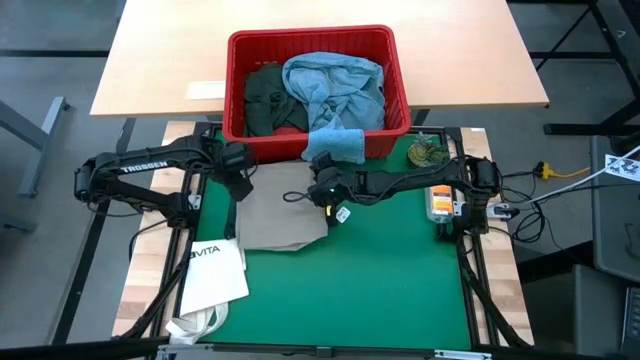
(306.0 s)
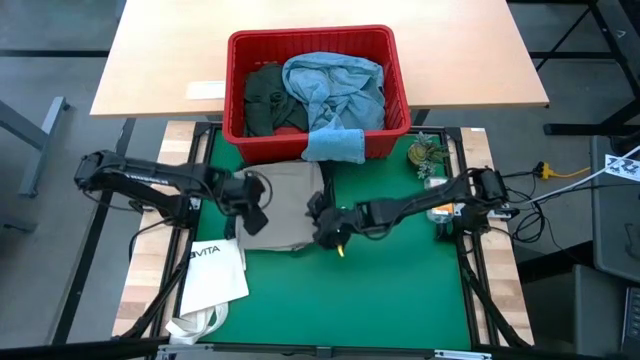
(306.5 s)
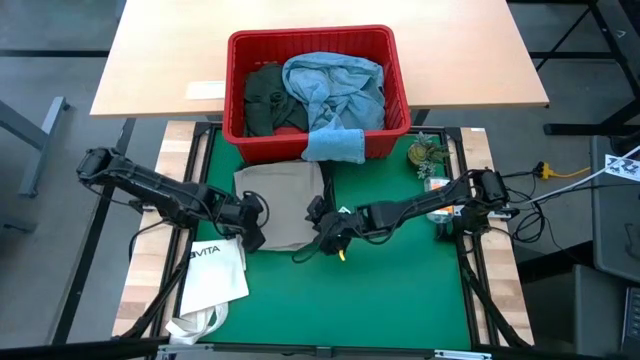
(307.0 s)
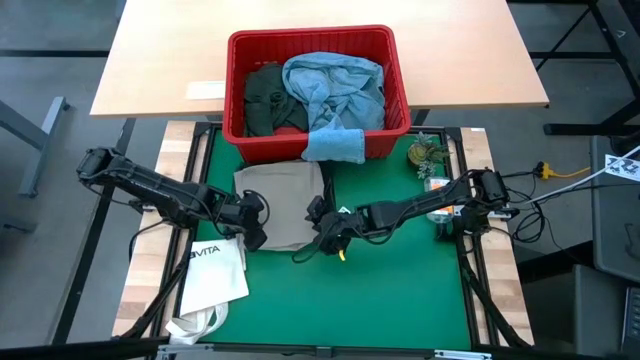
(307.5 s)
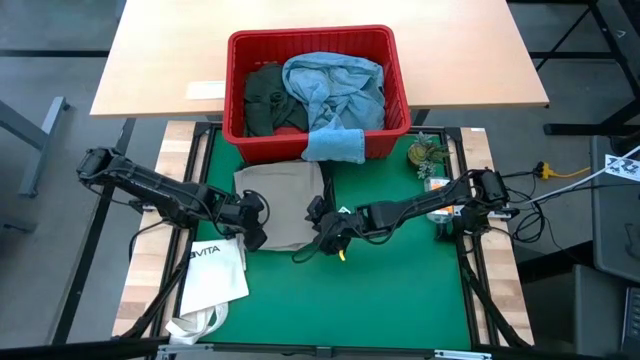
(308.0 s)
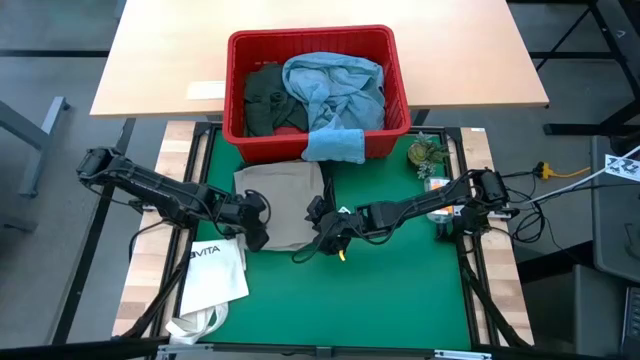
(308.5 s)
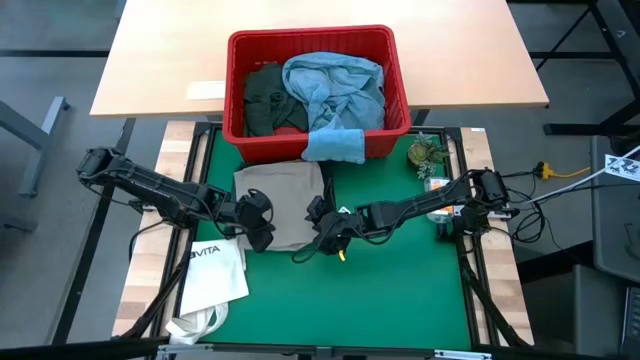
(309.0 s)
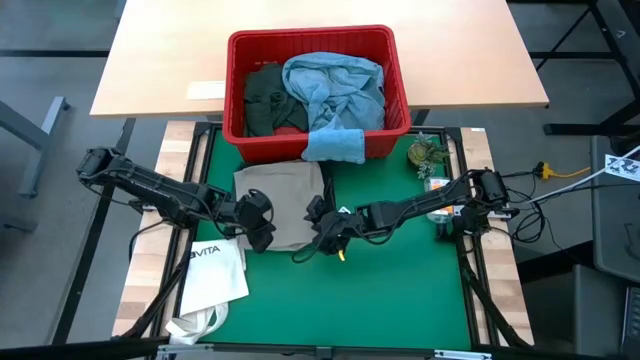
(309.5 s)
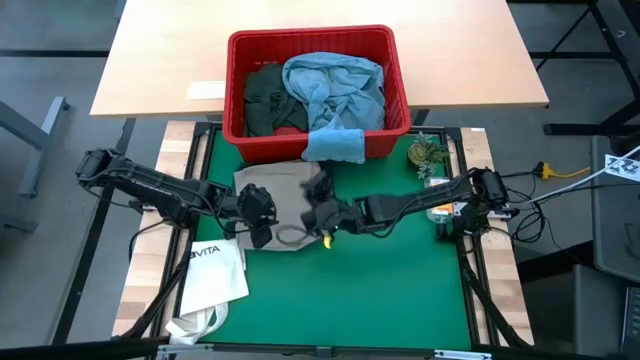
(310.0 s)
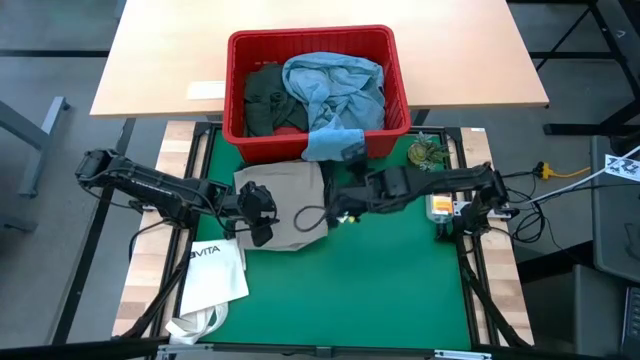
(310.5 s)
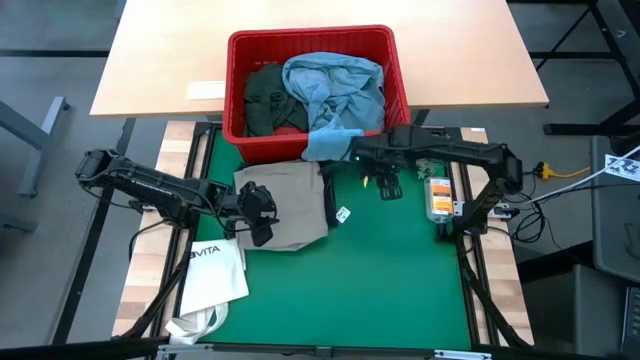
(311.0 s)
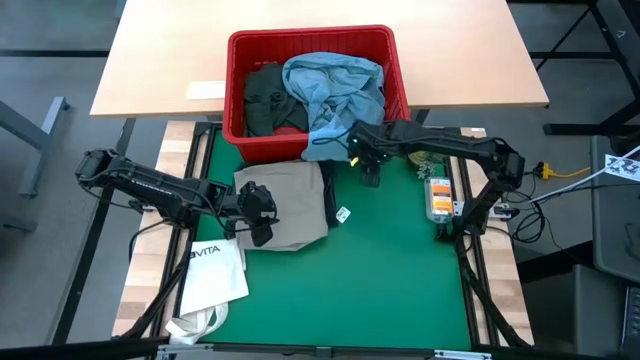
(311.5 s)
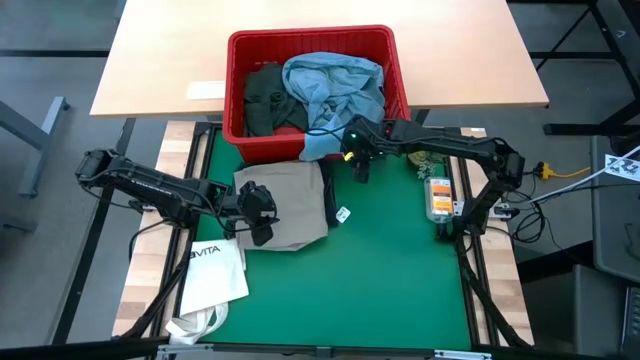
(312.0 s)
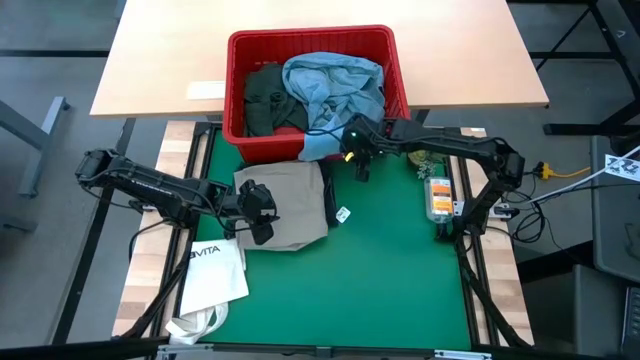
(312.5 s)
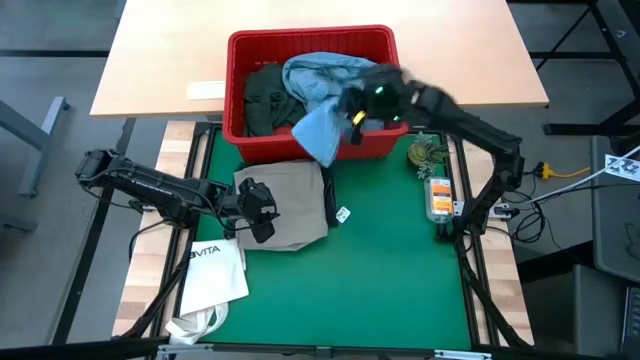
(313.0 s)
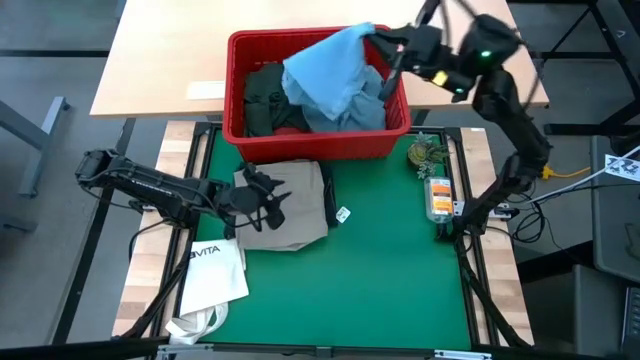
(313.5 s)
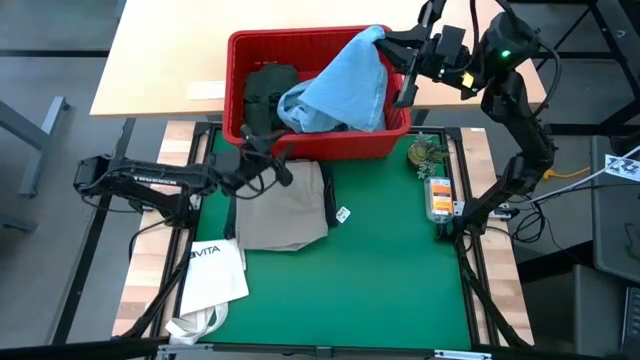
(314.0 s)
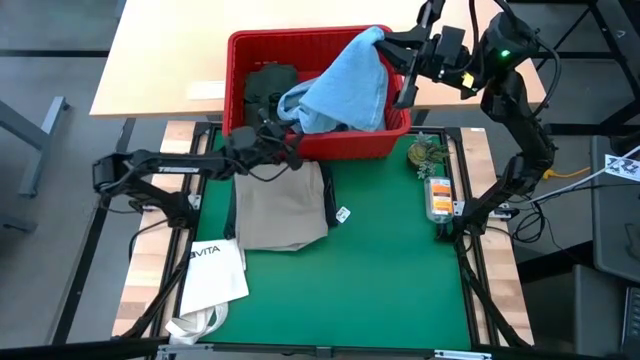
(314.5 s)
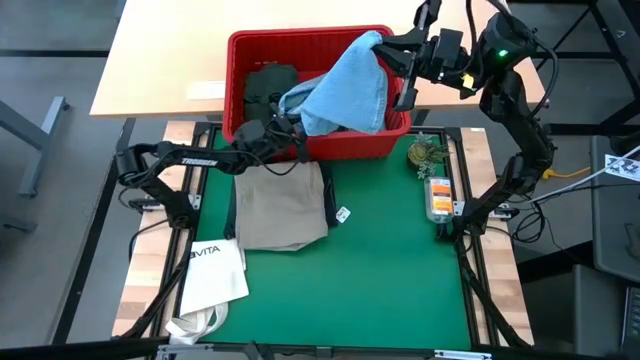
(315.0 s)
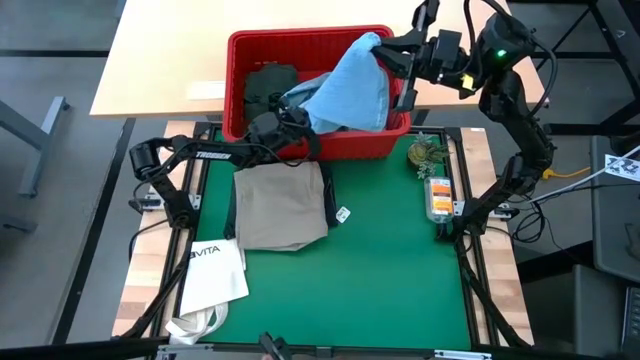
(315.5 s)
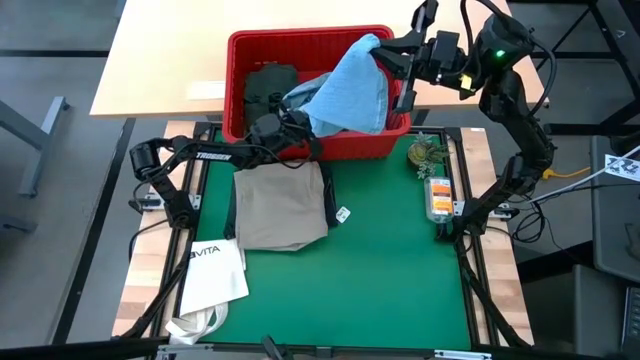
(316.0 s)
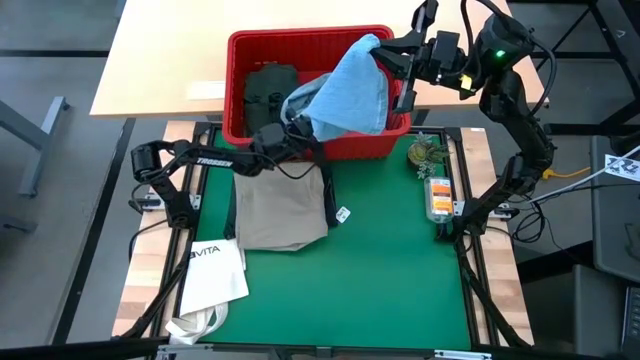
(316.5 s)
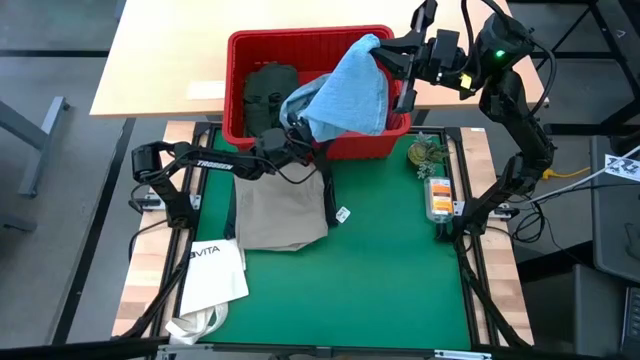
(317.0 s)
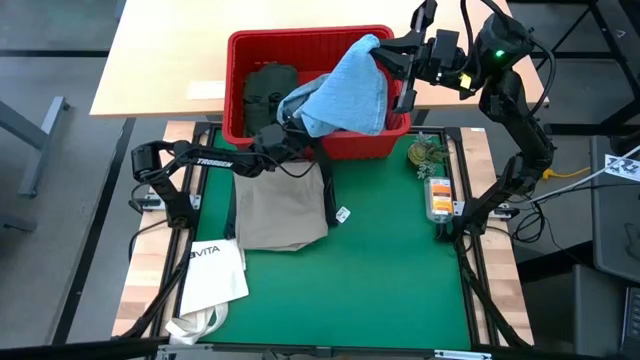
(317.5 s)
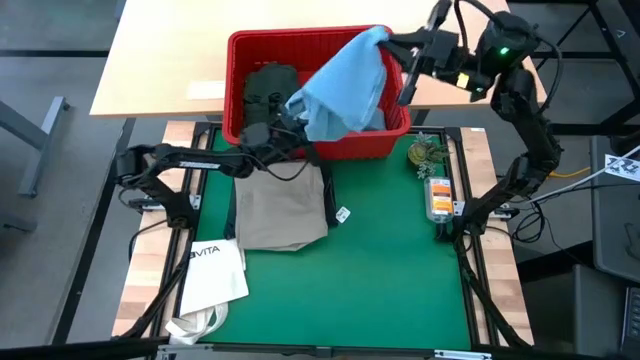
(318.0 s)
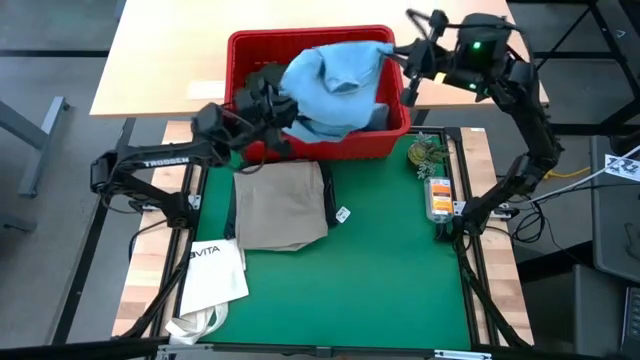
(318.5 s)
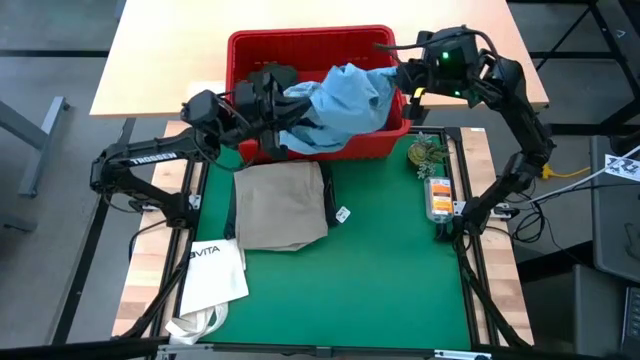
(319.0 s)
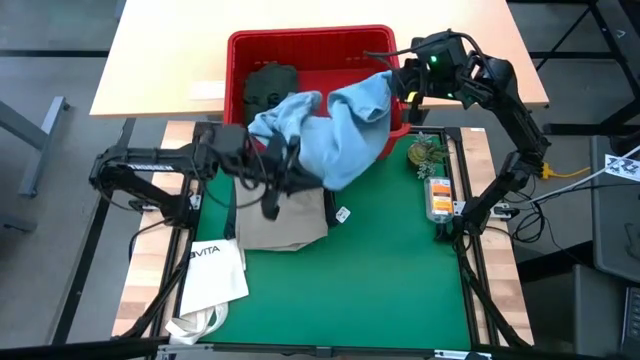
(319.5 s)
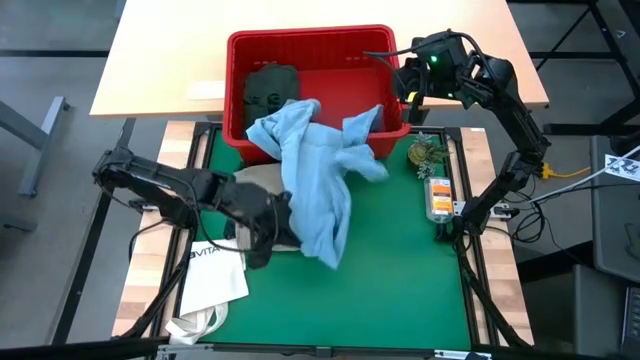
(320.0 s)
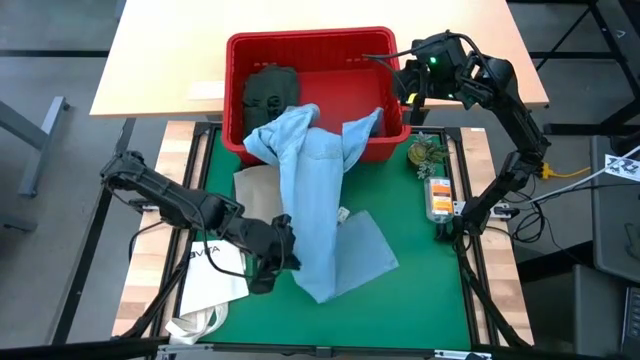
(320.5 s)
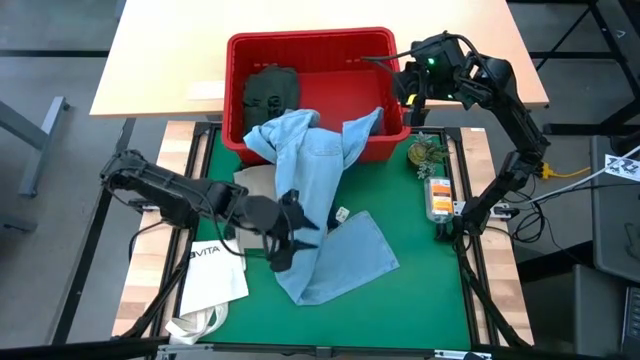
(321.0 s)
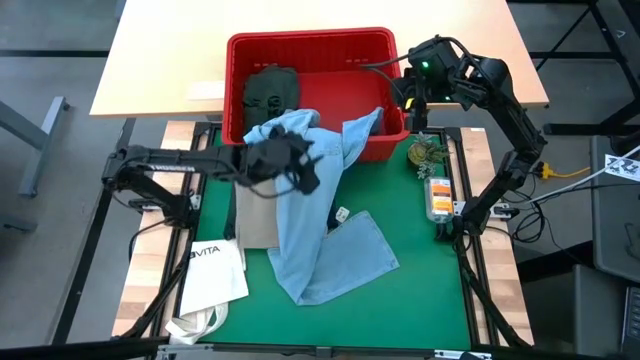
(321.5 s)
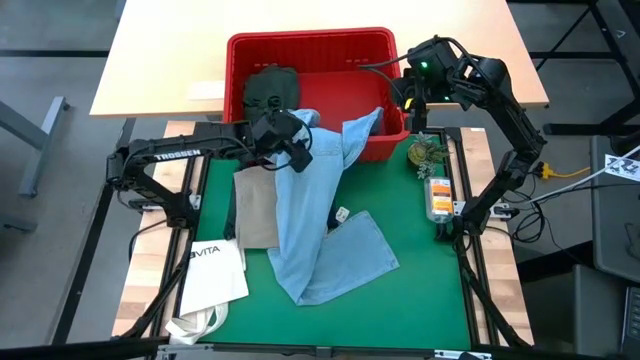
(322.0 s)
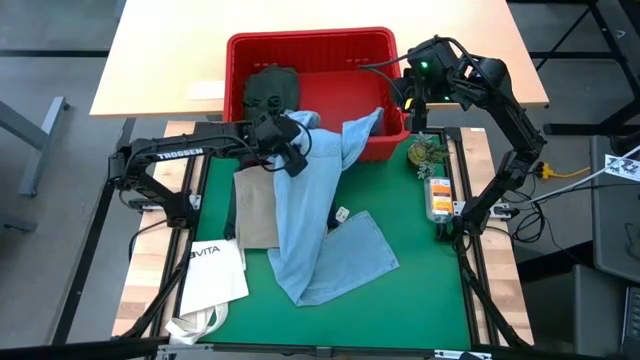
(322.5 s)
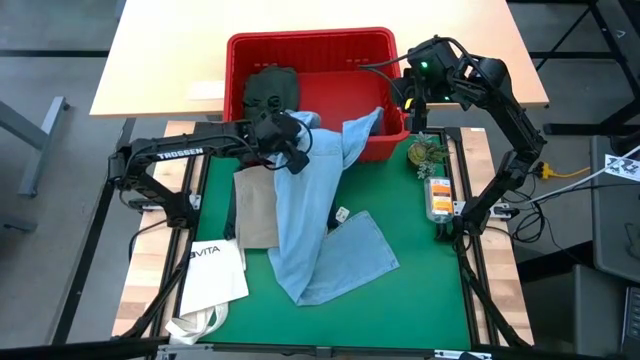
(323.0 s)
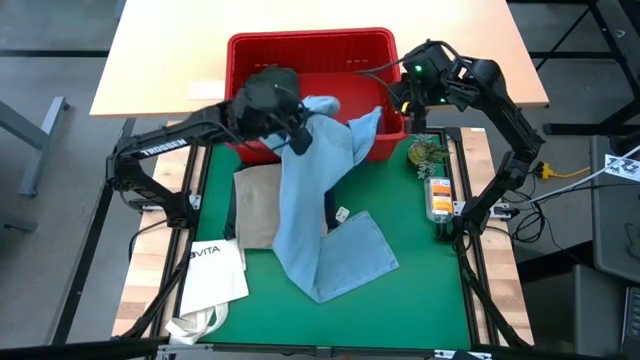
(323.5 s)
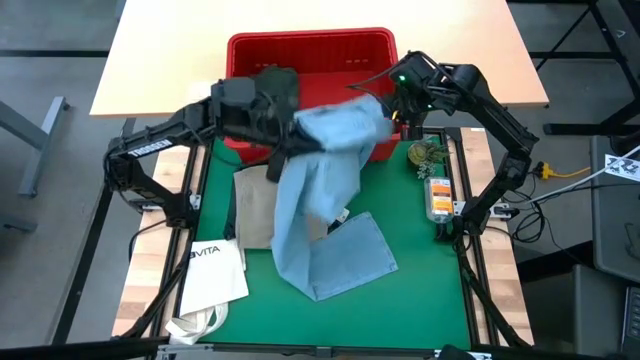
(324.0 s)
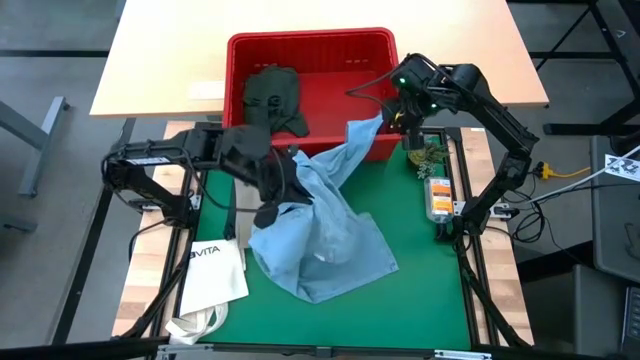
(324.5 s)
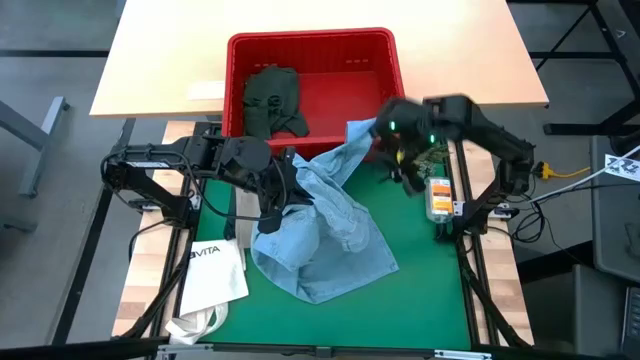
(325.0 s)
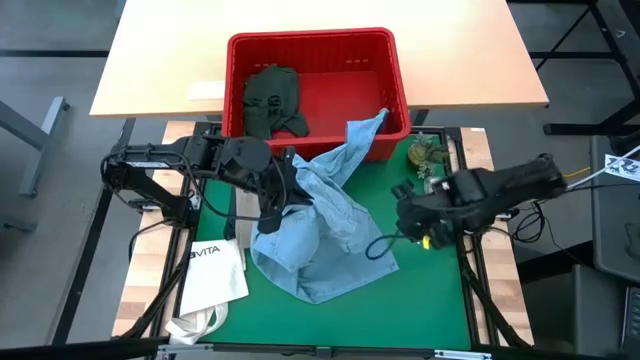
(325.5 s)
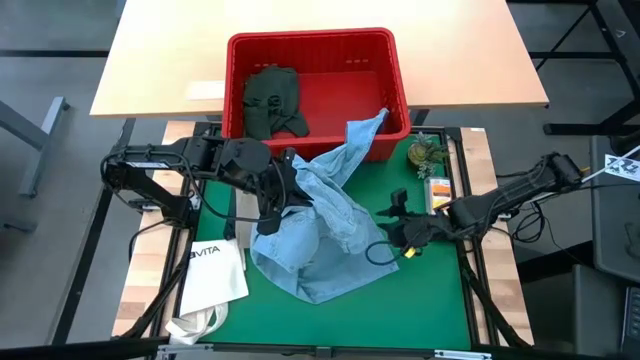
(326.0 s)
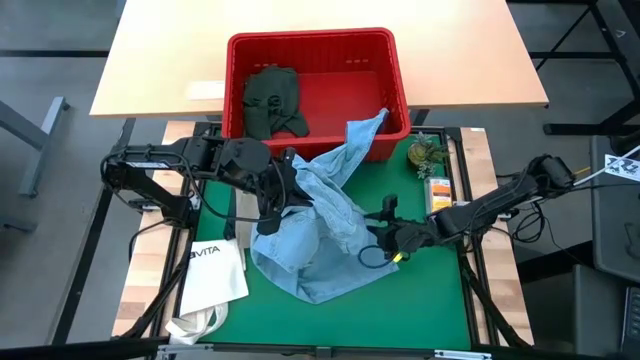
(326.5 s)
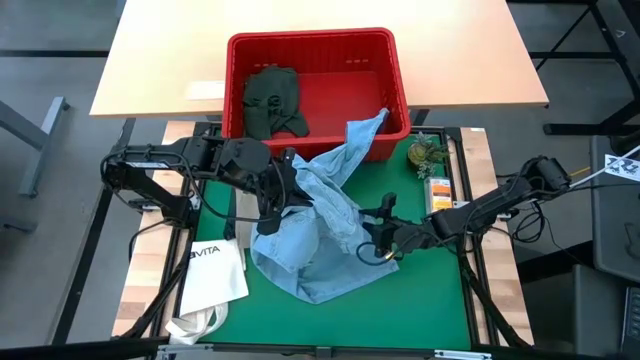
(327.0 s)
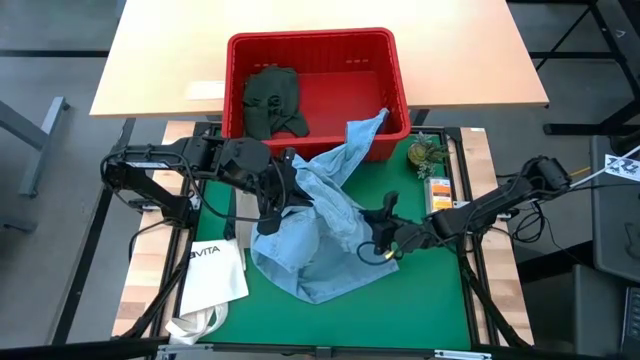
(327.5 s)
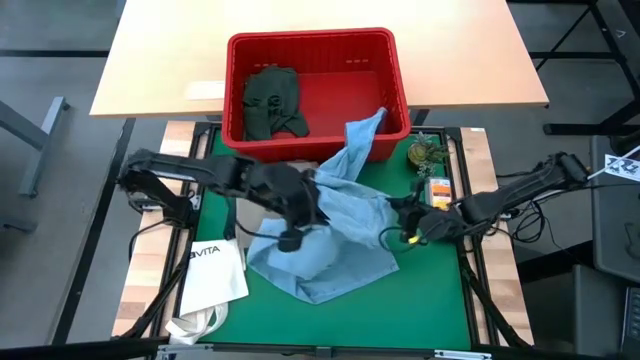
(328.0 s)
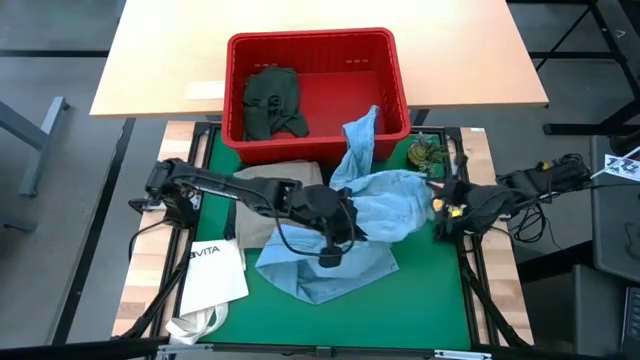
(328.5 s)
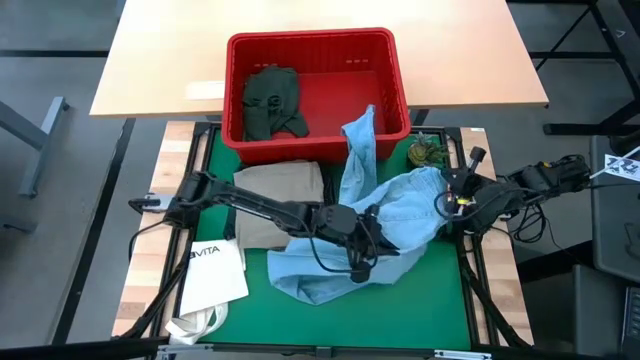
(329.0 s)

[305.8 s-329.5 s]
Task: Fold Laundry from Bin
Fold the light blue pants
